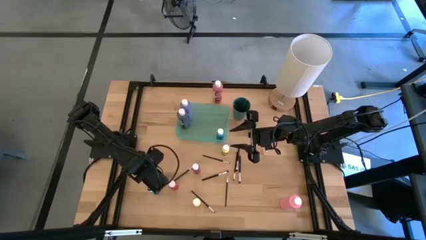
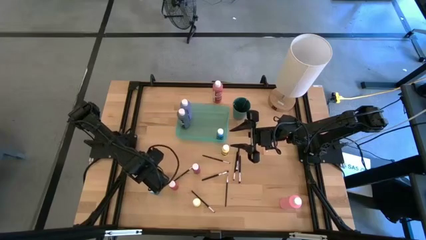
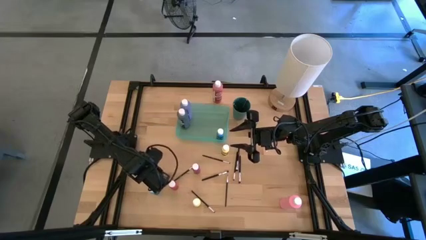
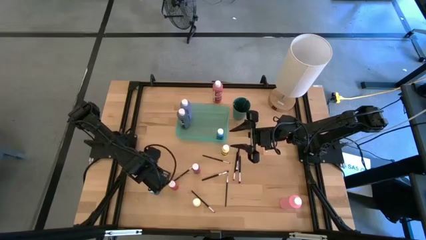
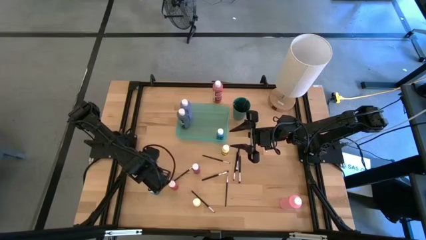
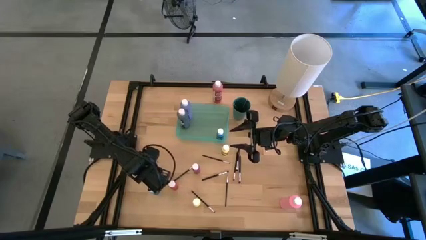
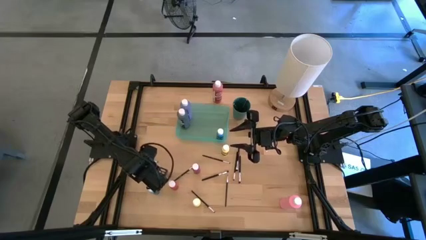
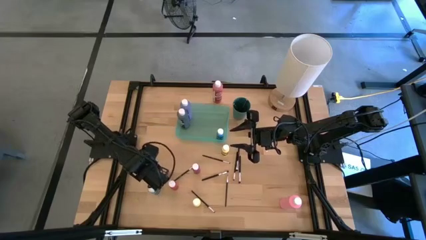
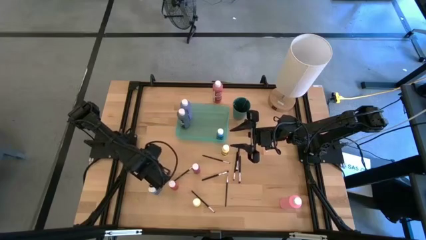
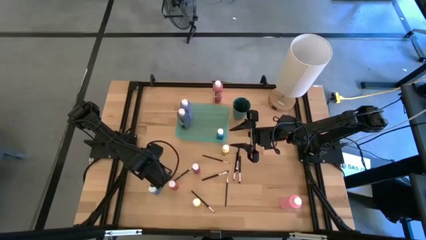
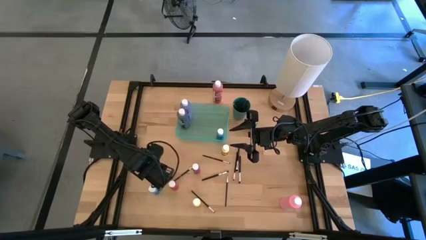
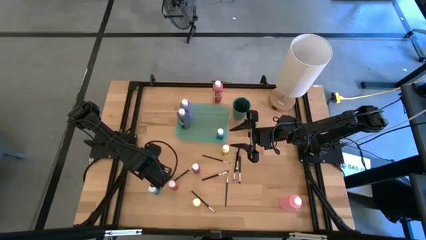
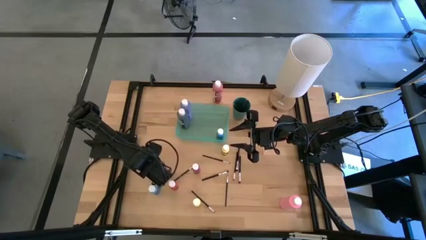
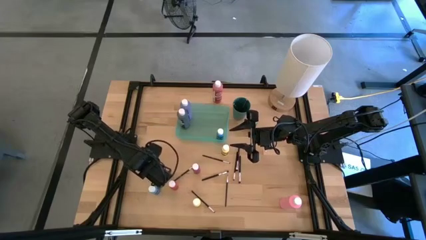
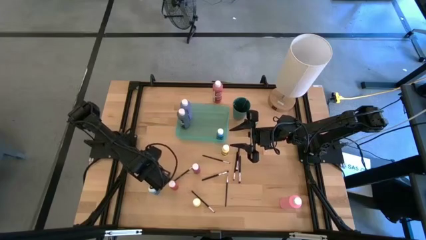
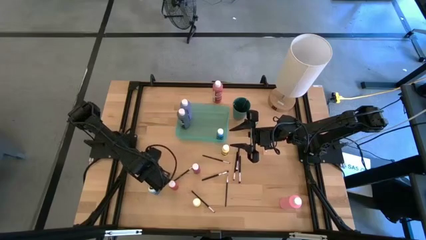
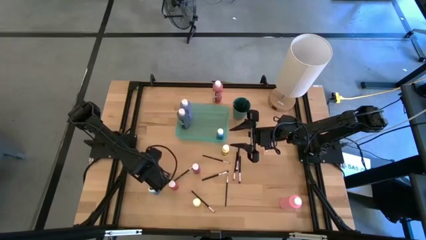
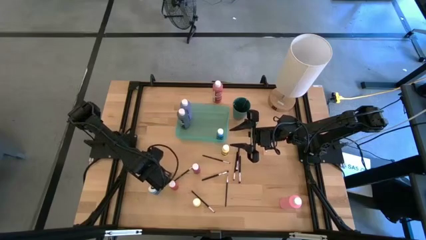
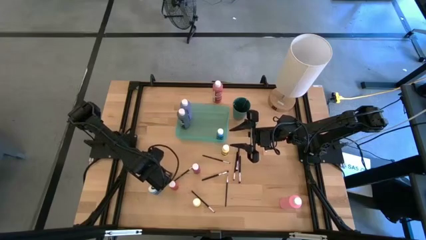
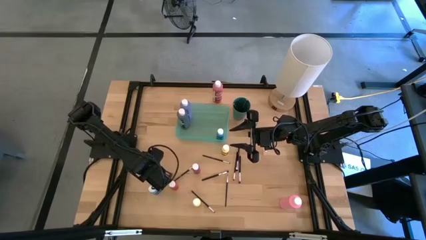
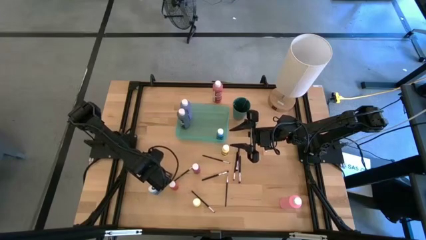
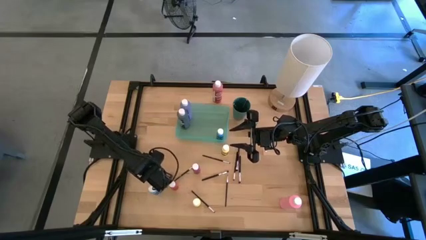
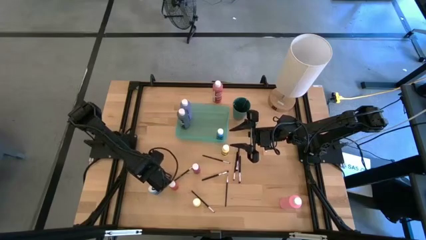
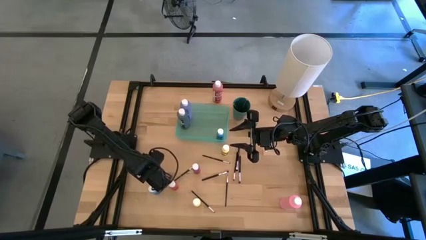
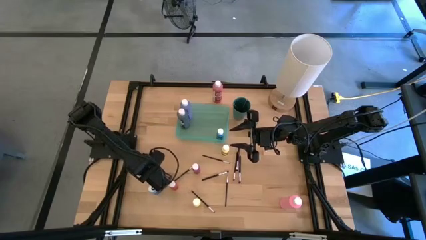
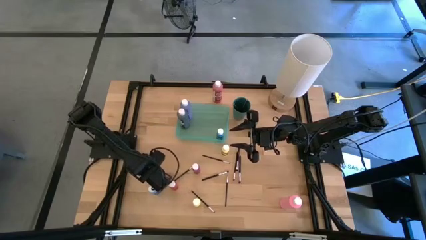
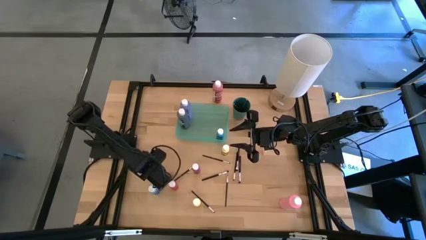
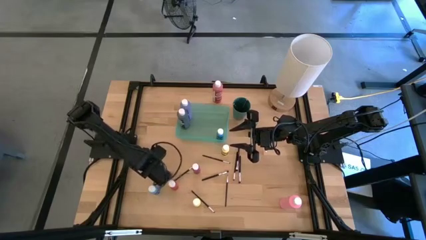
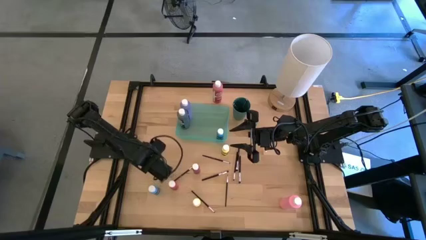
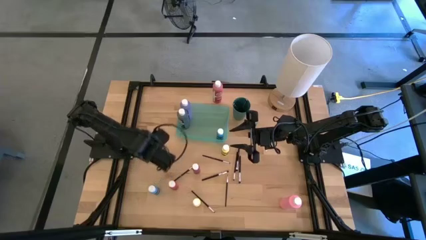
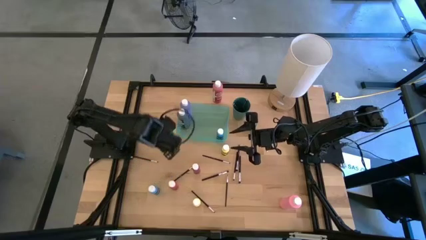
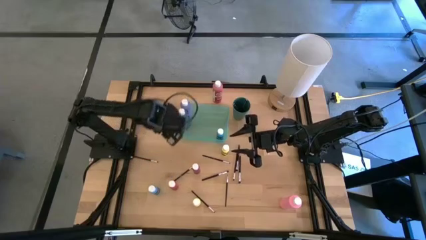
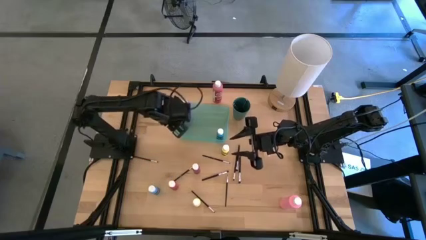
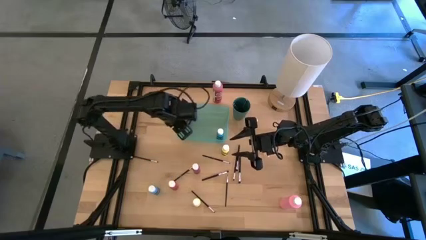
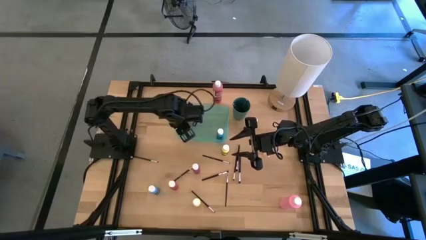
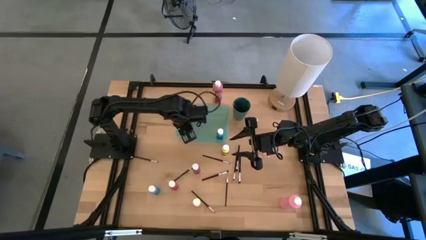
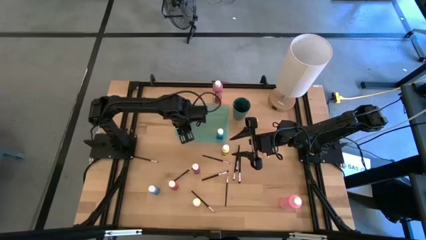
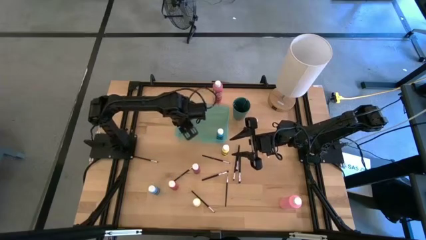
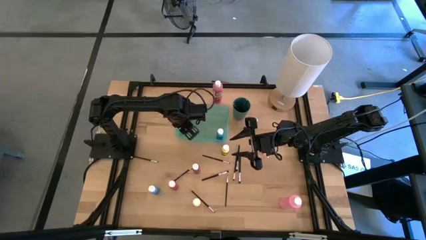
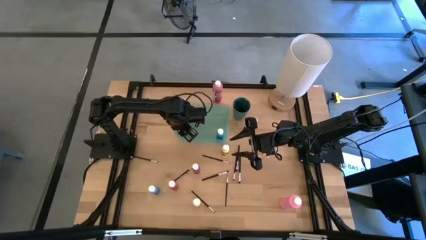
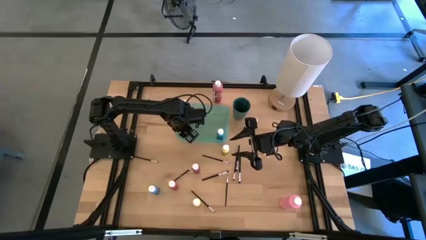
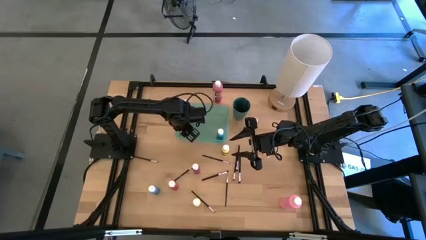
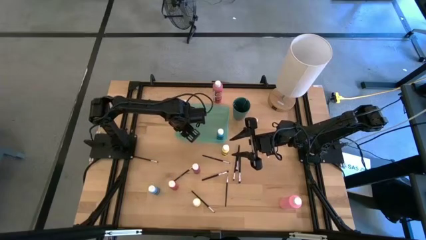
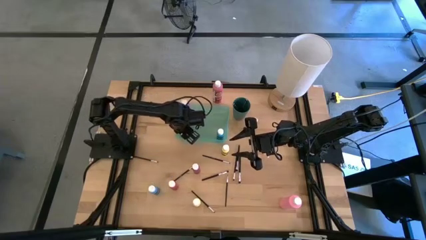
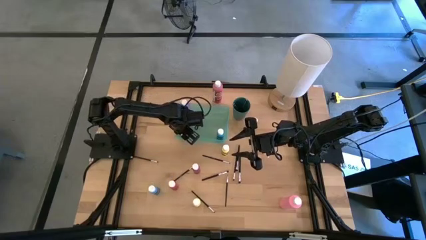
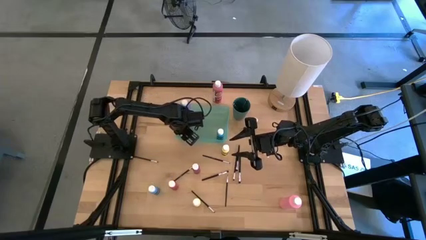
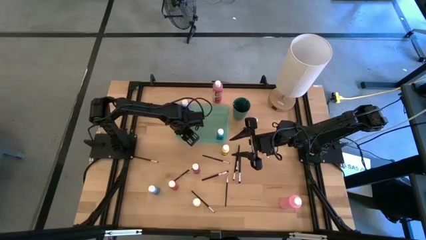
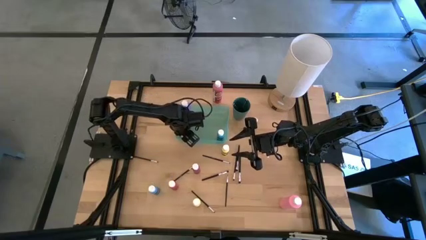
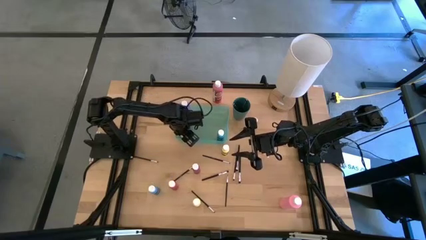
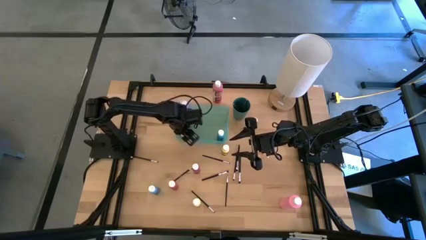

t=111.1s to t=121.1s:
Task: Pick & Place Paint Supplies
Put the left small yellow paint bottle into the green bin

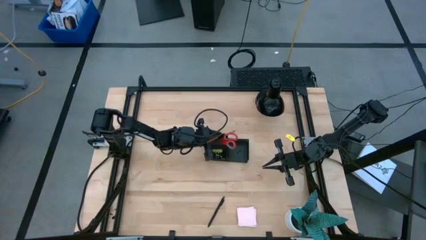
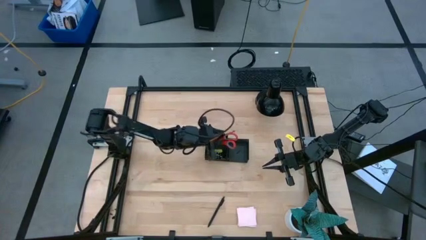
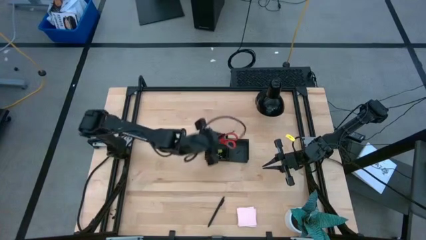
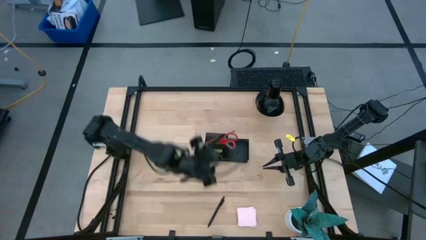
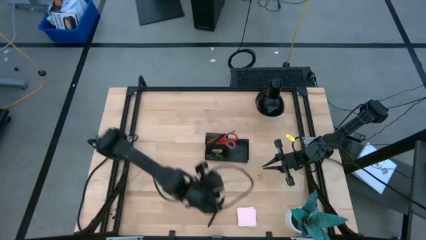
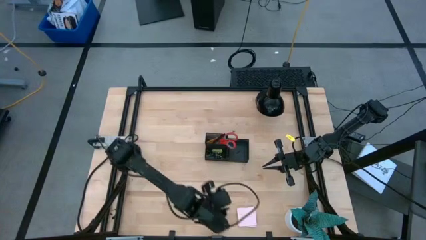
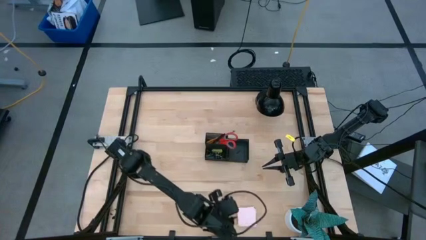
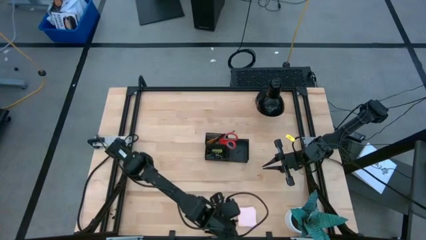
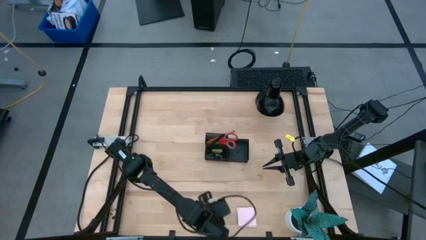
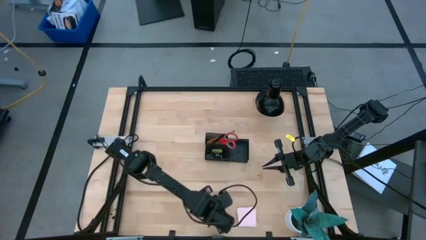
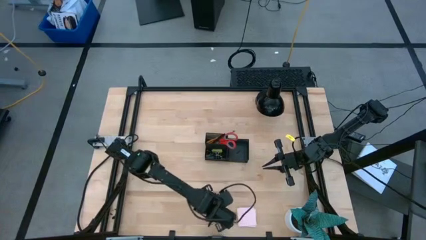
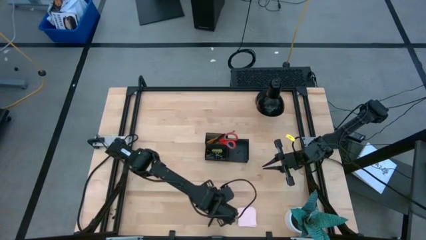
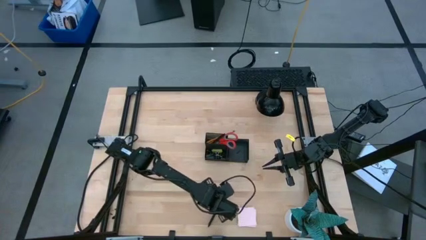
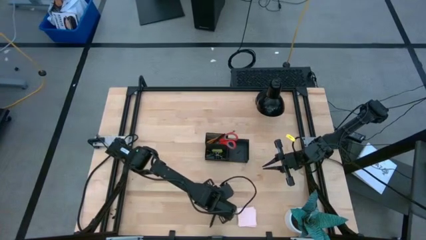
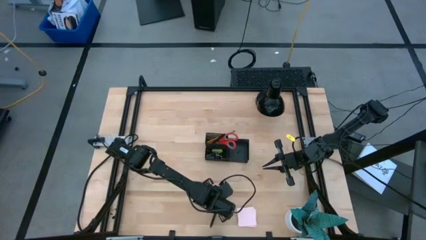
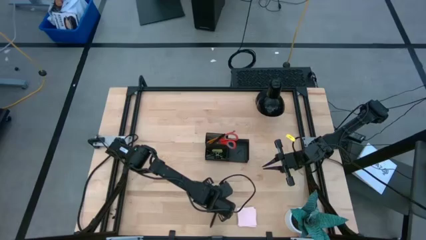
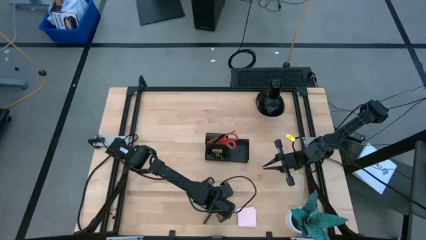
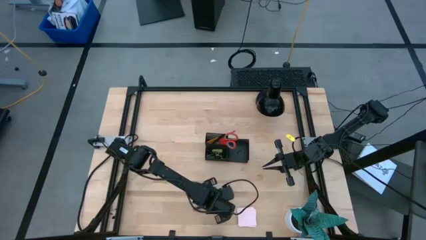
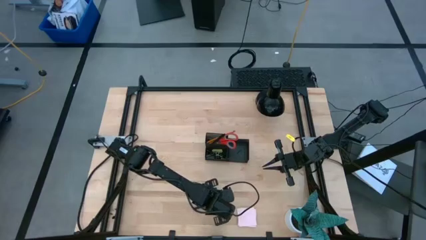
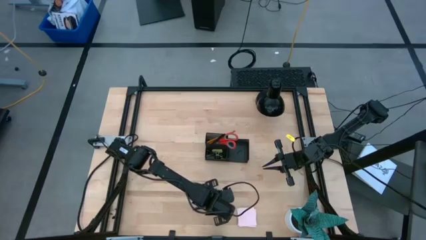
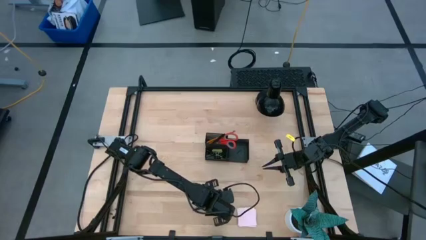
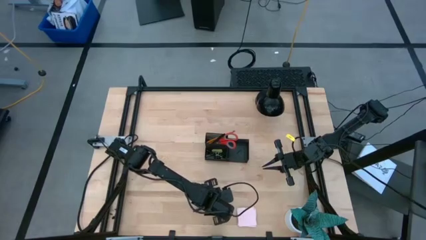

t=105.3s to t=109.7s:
Task: Pick and place office supplies into organizer
Put the black pen into the black desk organizer

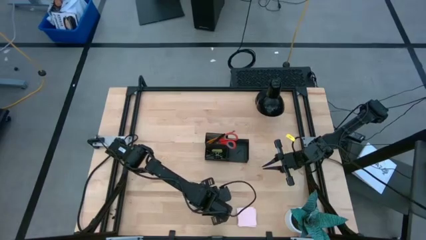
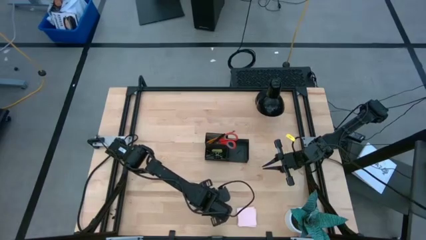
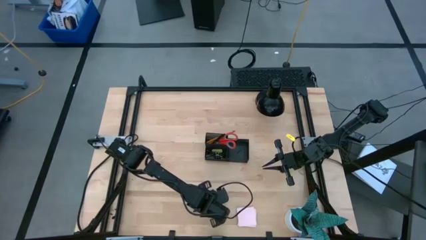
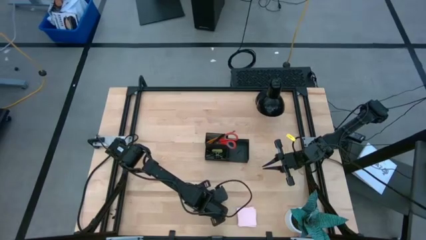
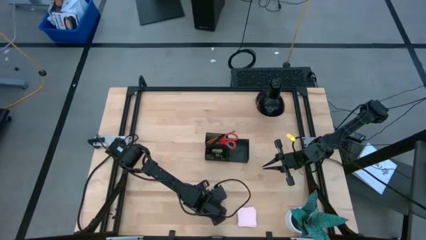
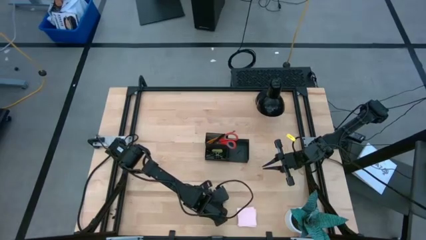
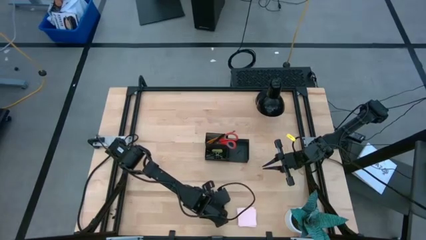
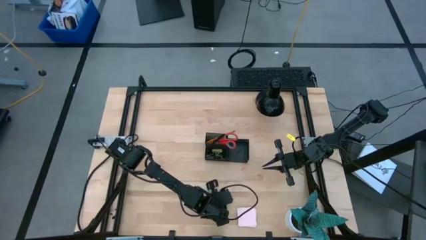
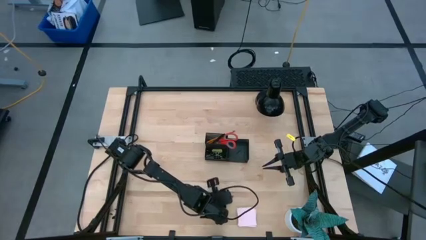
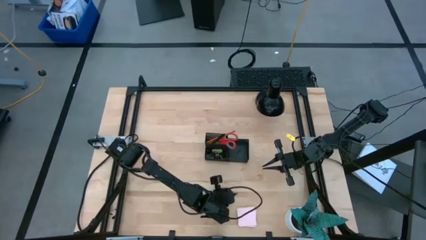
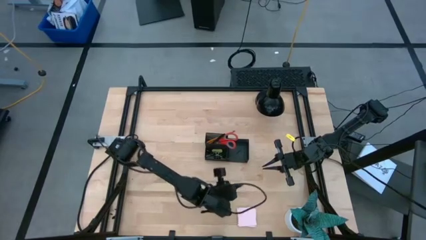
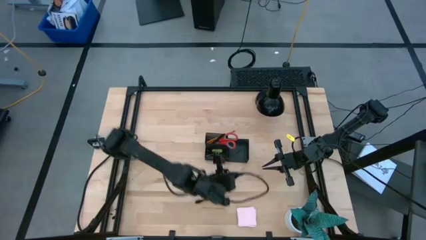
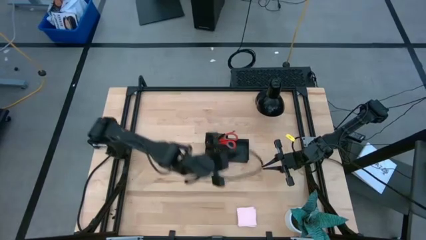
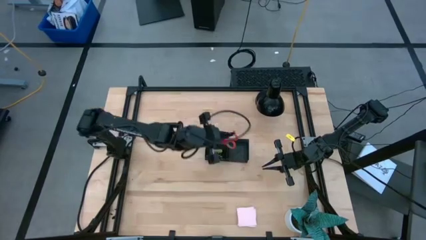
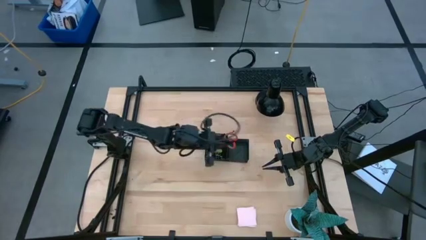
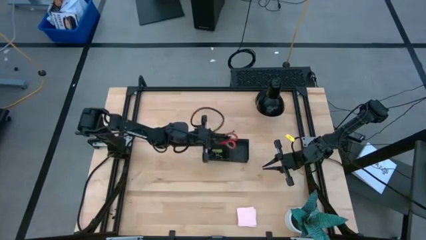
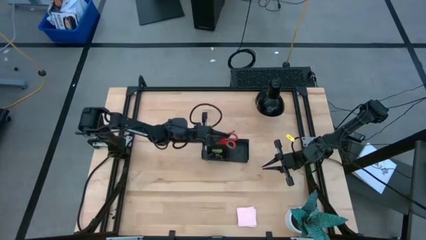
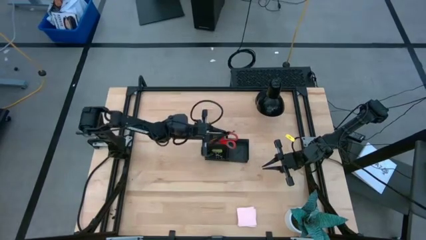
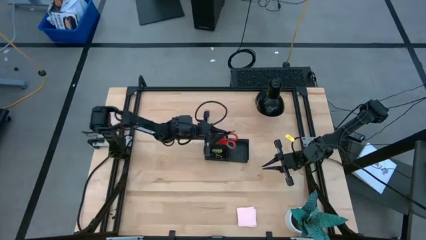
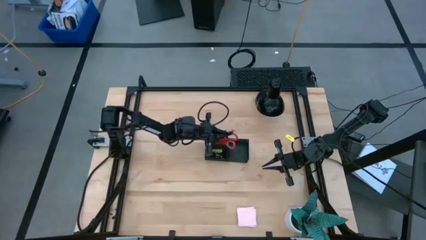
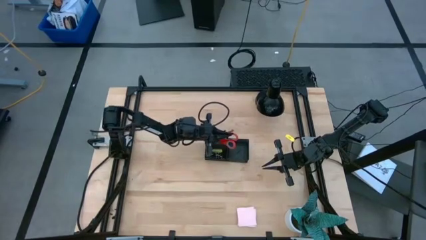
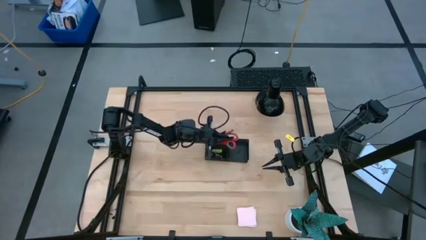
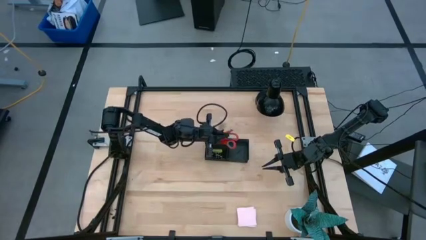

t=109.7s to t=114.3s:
Put the black pen into the black desk organizer
